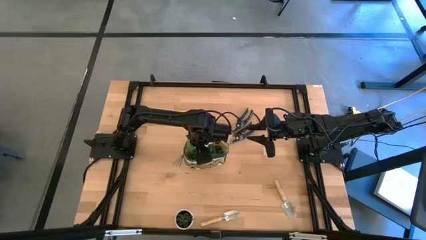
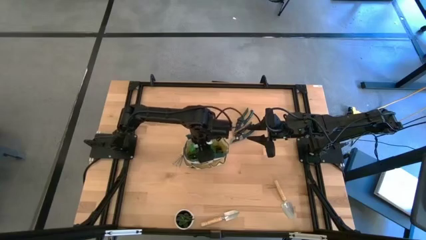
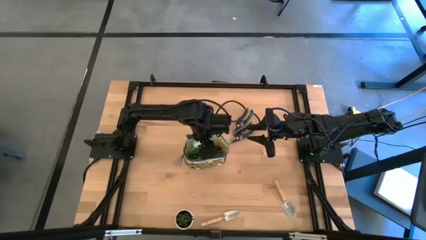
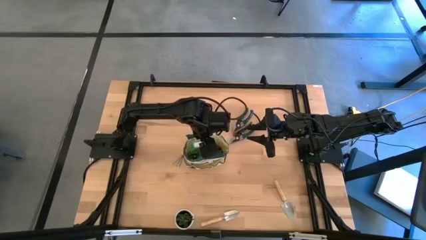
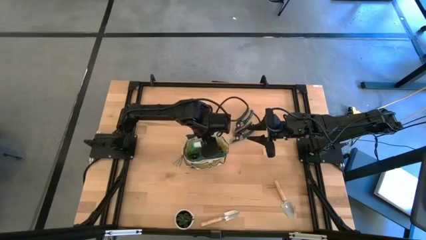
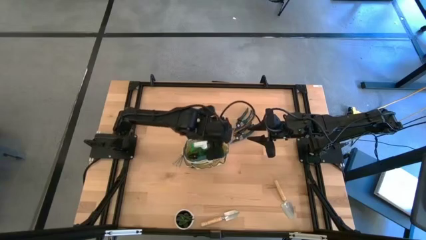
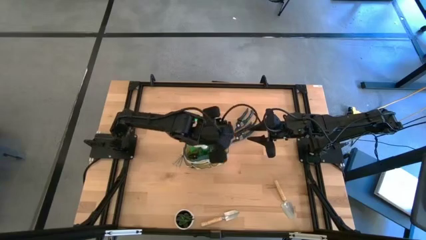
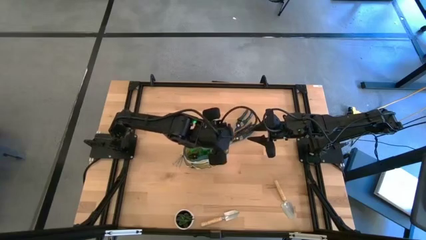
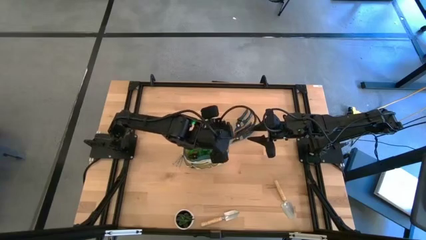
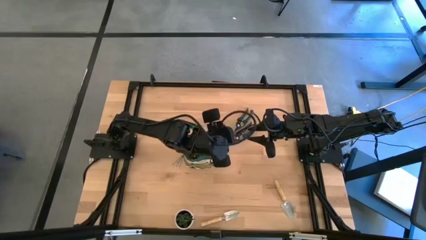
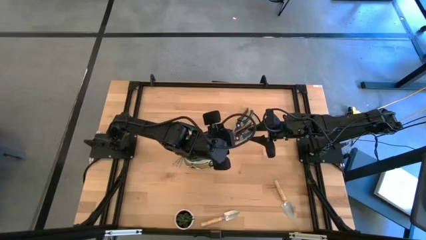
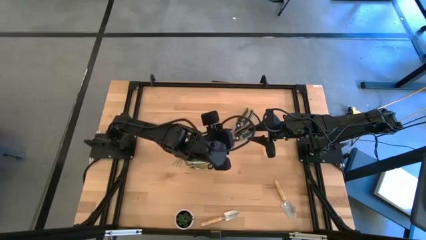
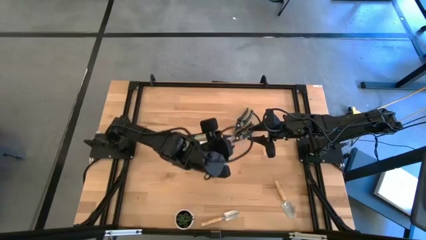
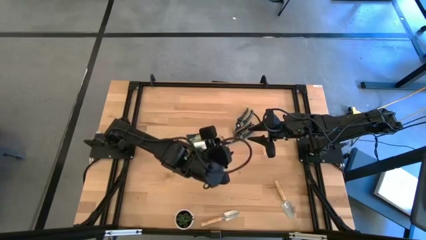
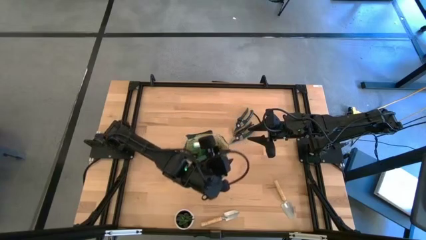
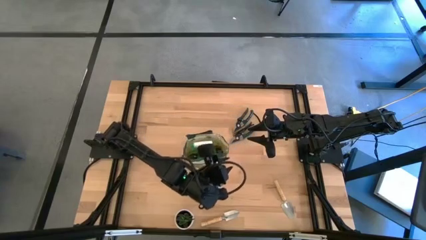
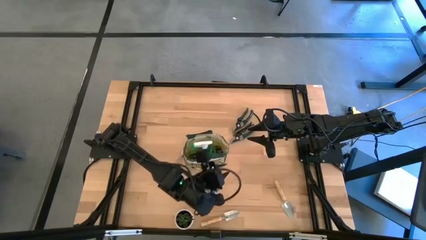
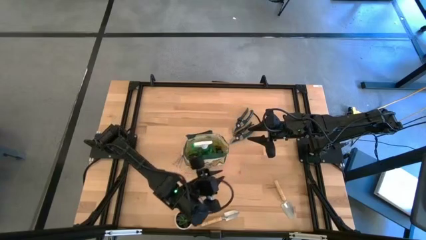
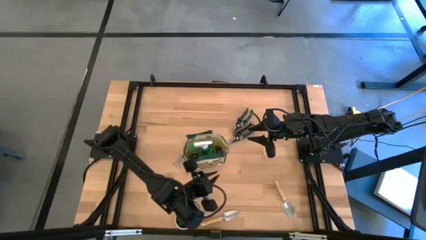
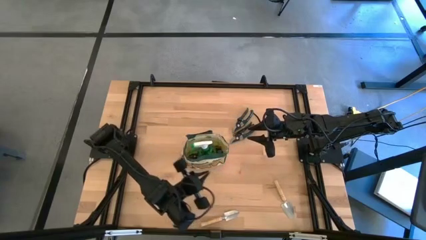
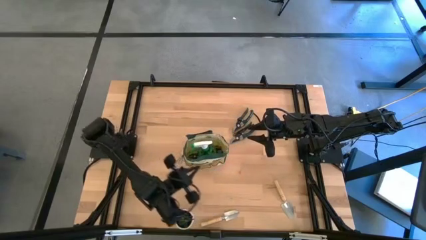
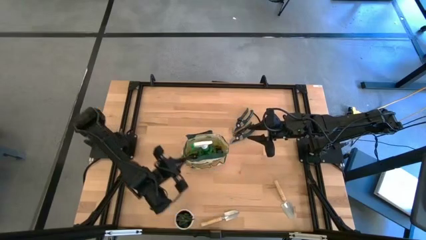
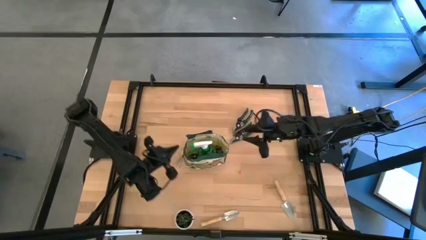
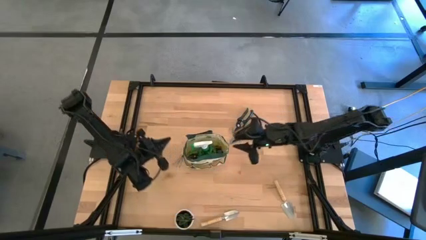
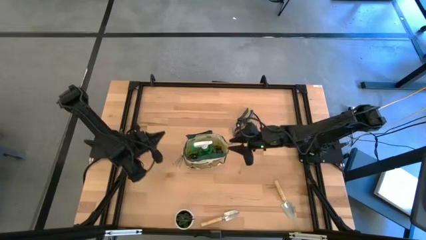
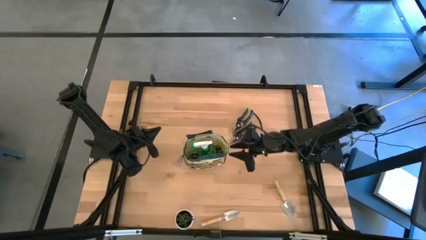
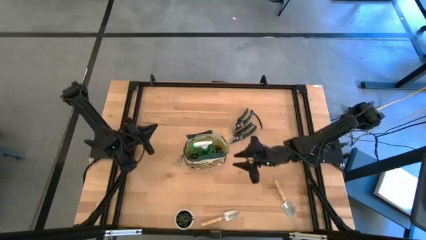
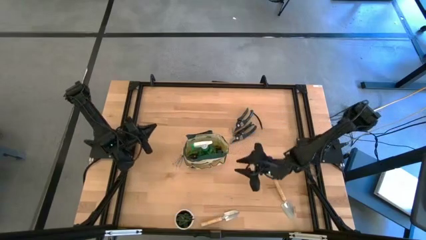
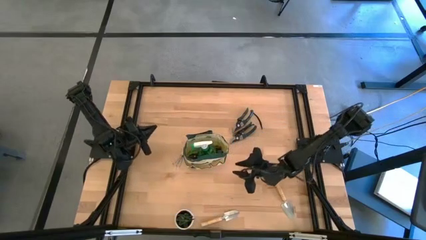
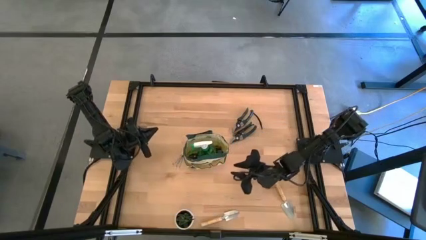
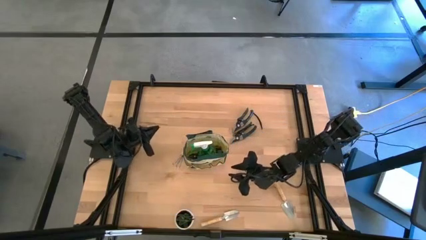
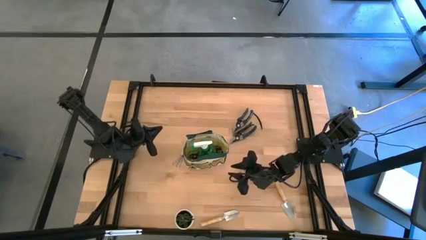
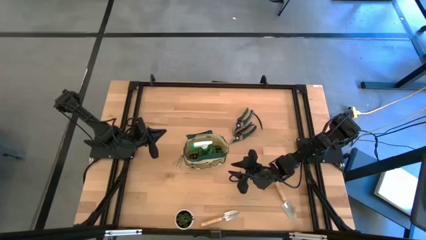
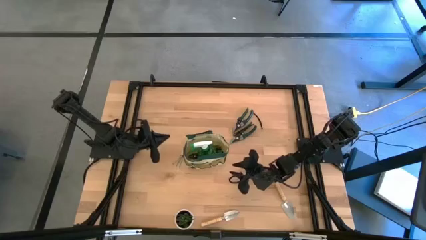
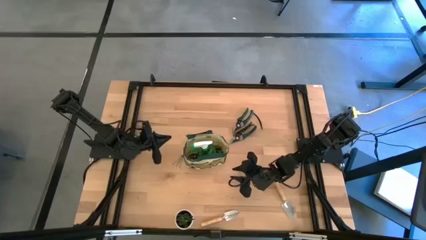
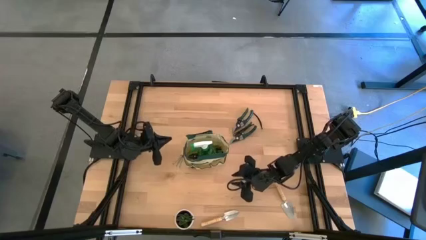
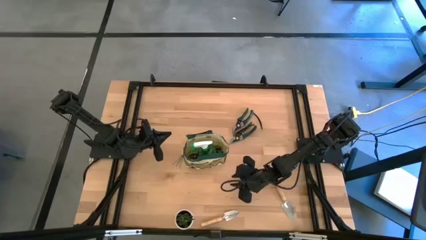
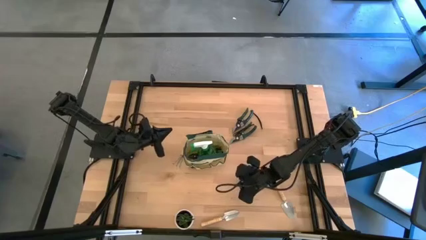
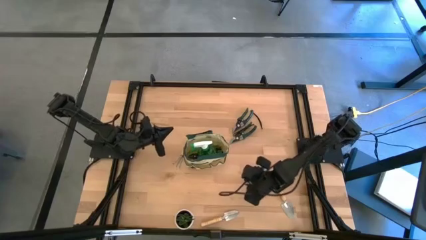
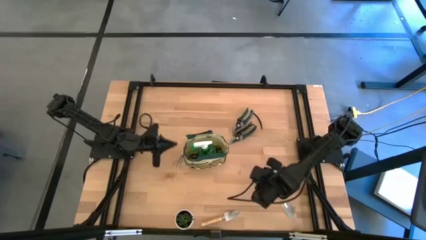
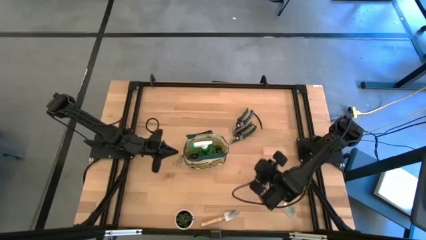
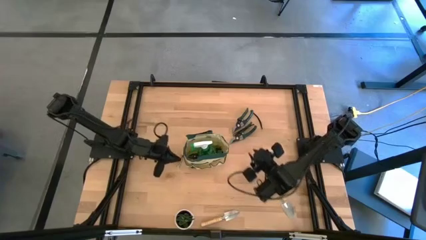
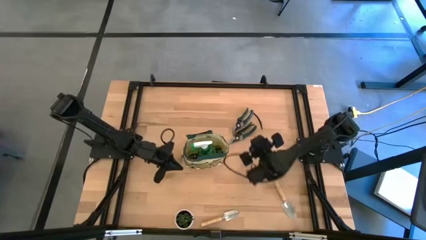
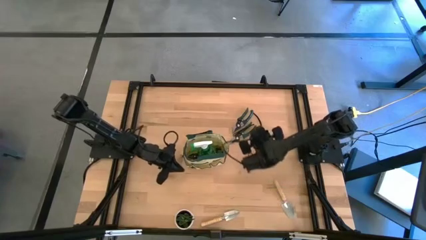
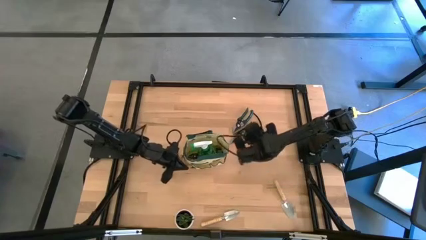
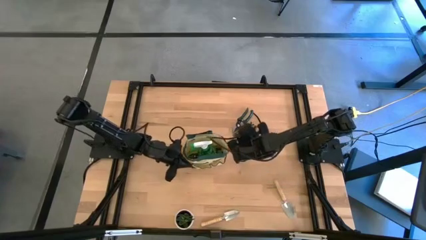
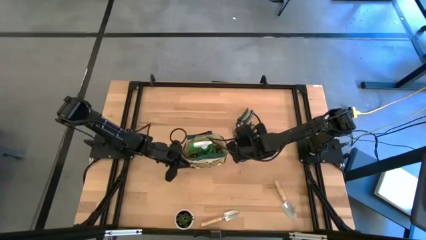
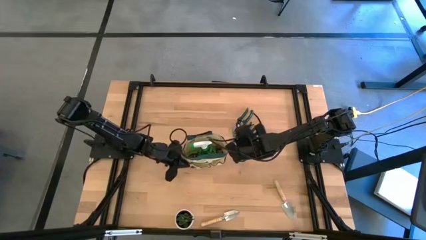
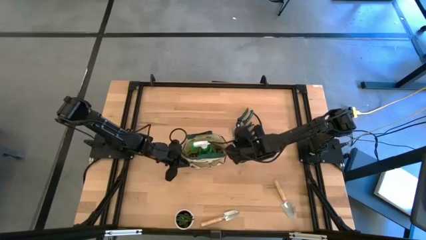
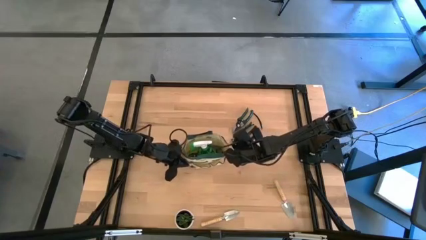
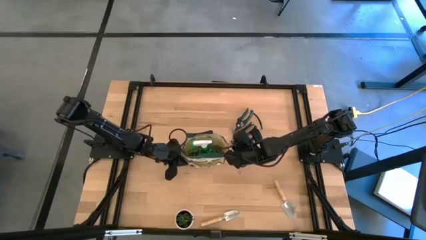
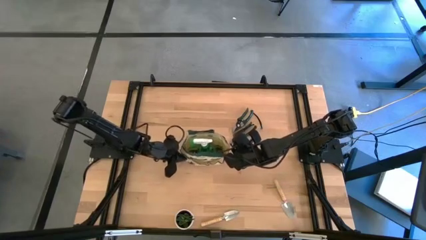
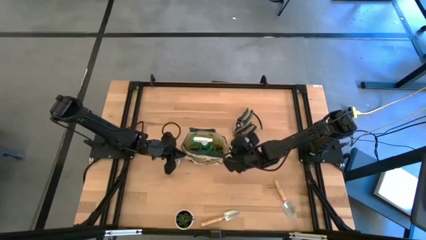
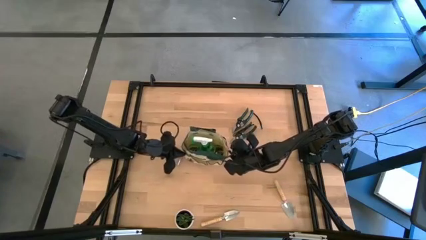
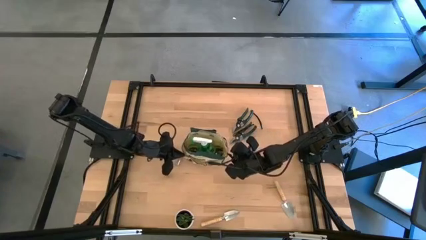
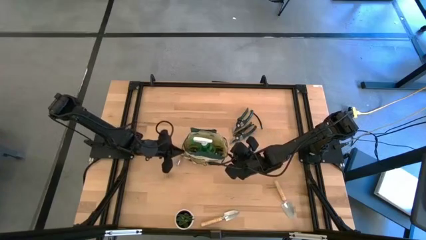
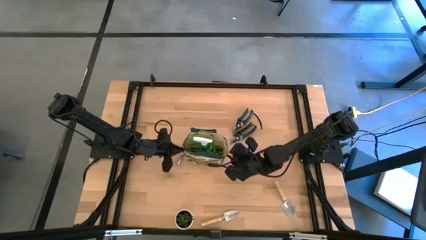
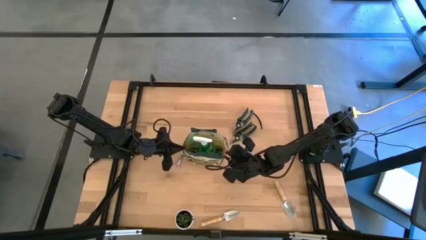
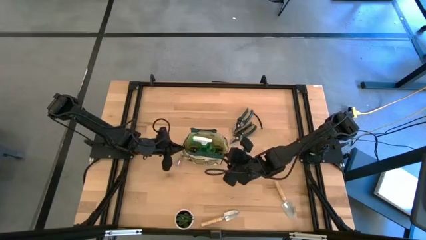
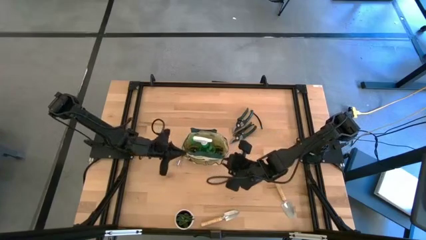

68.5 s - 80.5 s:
Task: Pick & Place Garden tools in Gardening bag
Adjust the green gardening bag

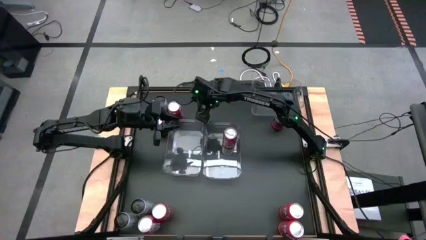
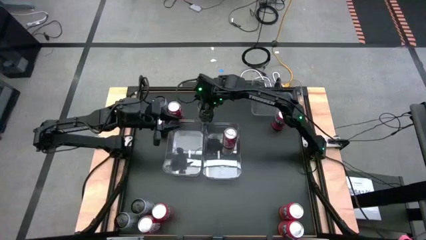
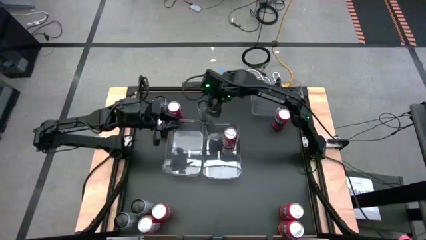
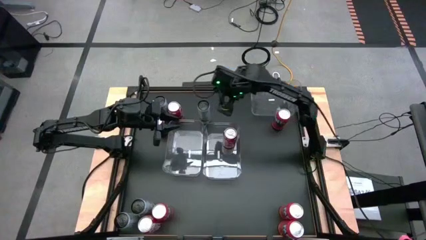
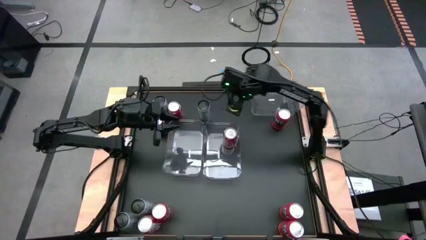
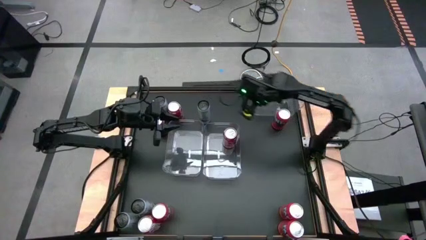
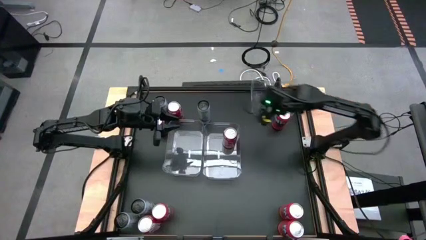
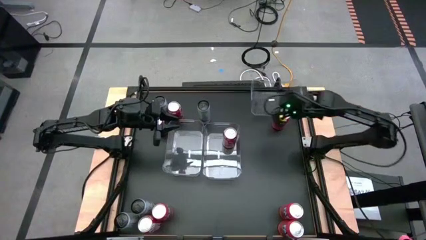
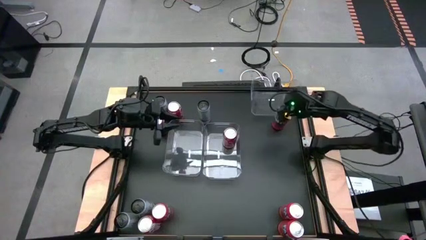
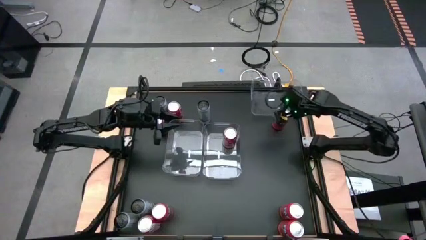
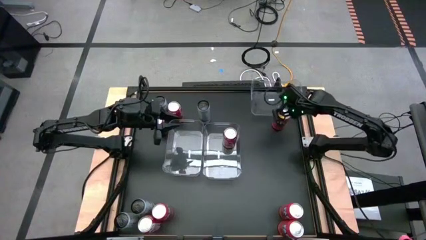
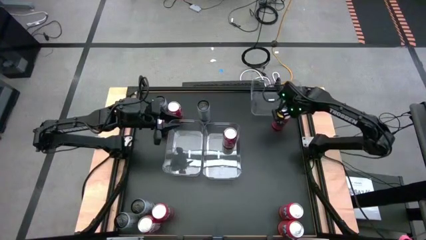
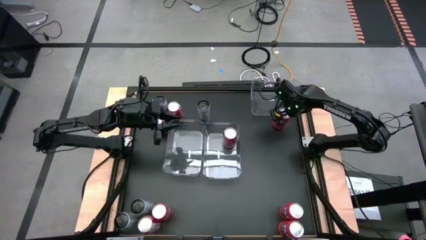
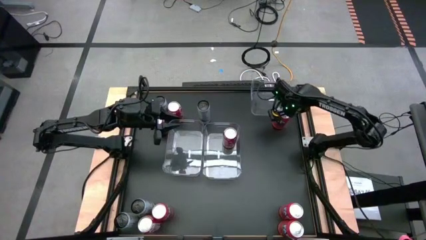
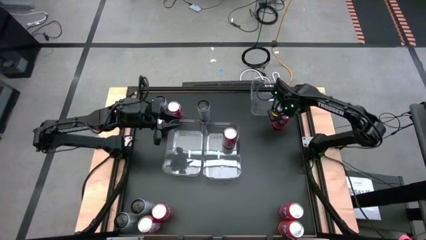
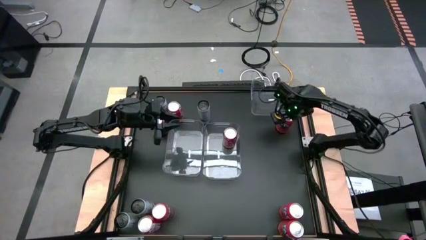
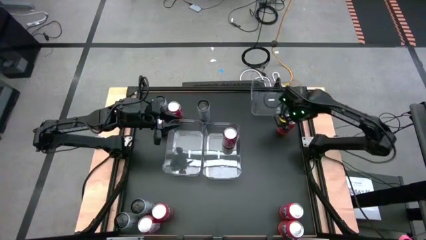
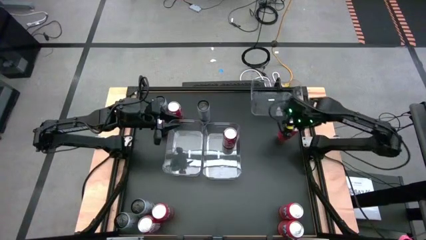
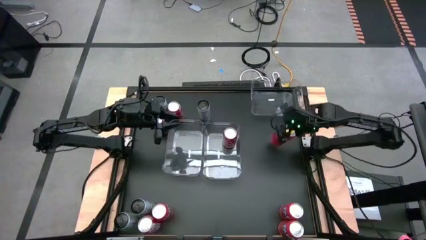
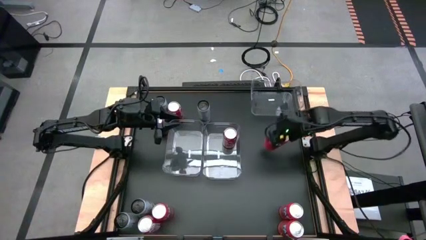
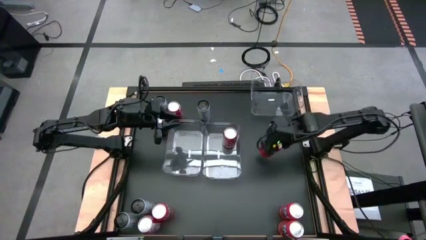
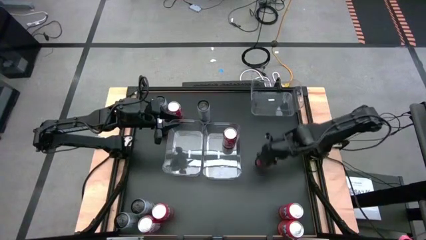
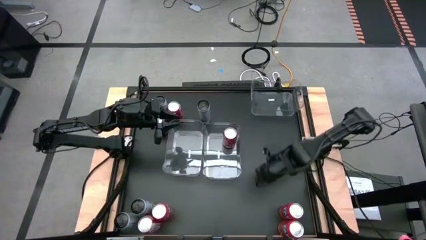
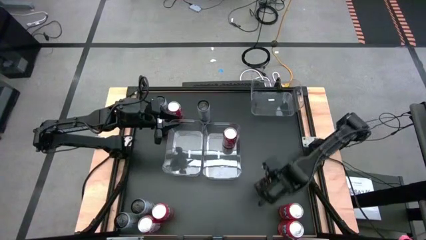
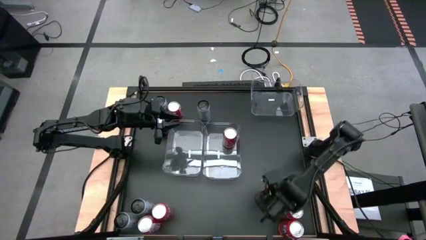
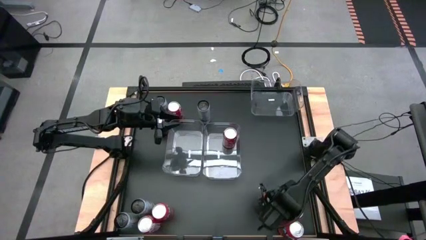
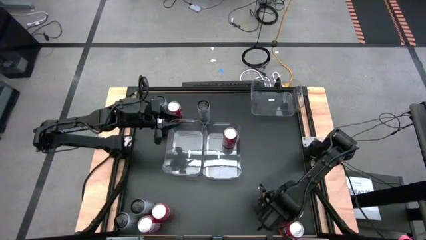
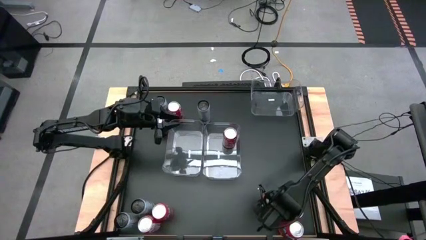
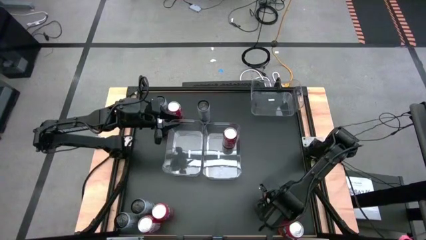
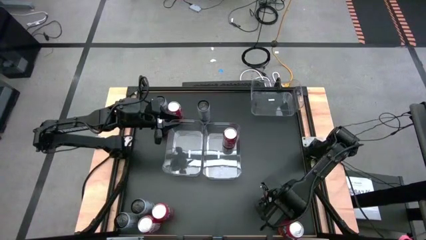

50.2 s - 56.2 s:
Task: Sort soda cans
Move the red soda can to the bottom right of the table
